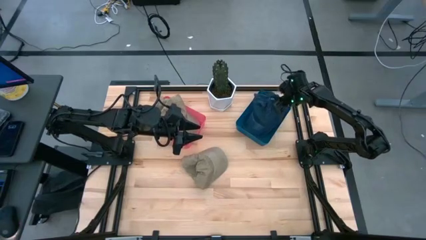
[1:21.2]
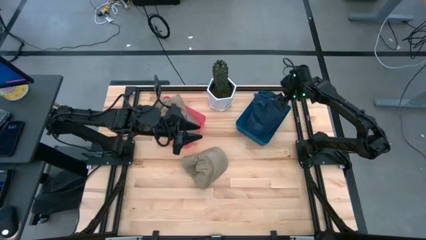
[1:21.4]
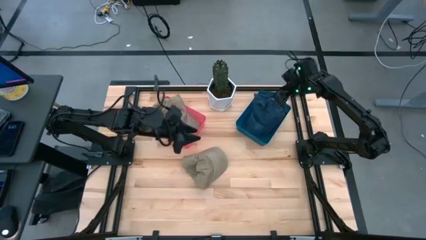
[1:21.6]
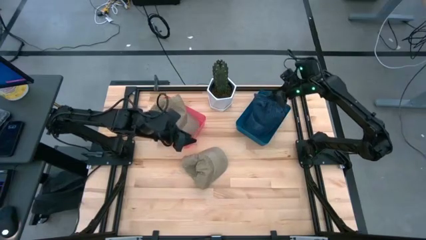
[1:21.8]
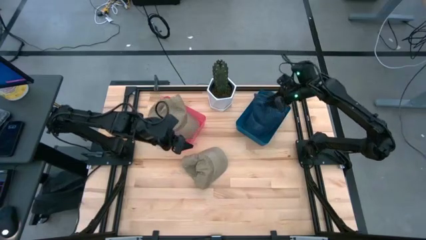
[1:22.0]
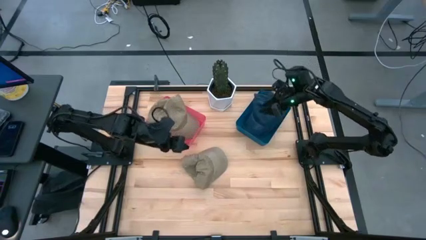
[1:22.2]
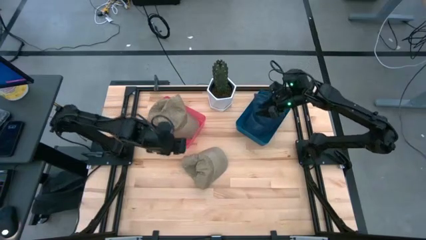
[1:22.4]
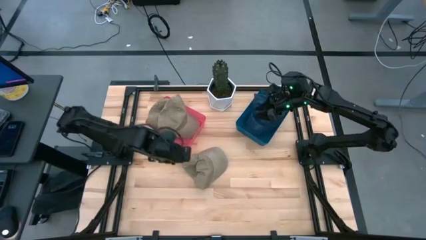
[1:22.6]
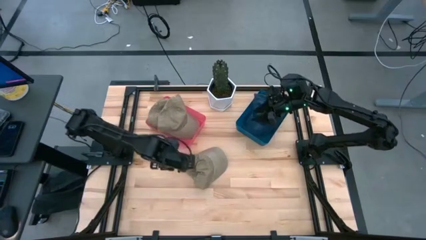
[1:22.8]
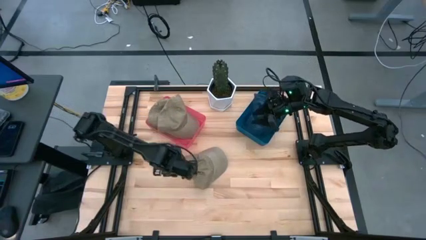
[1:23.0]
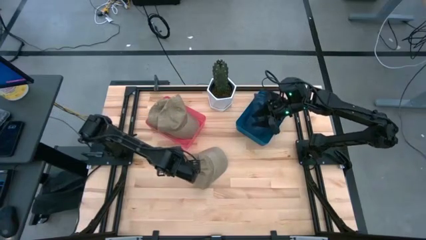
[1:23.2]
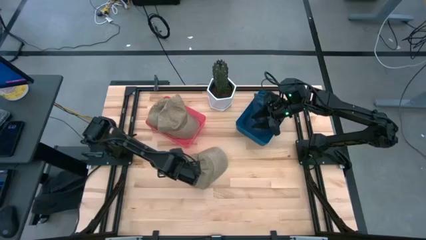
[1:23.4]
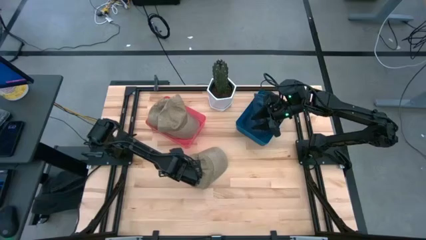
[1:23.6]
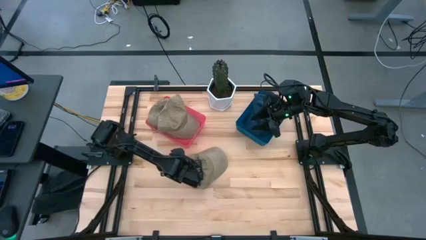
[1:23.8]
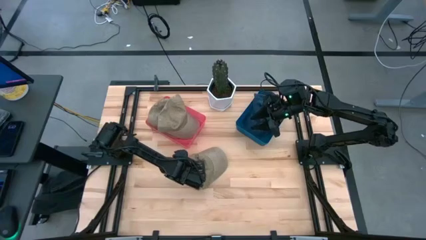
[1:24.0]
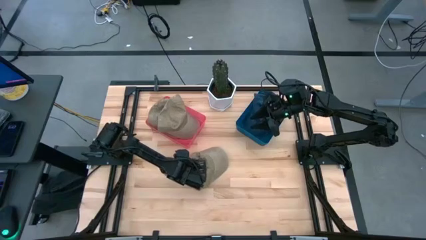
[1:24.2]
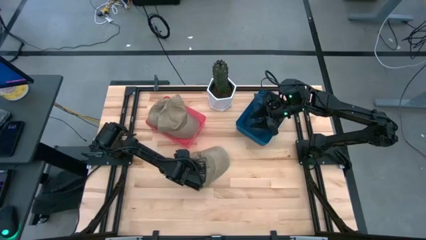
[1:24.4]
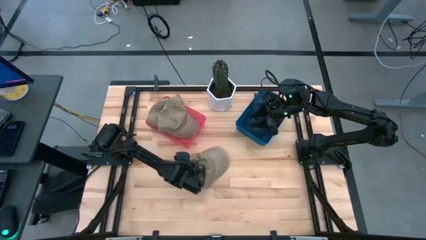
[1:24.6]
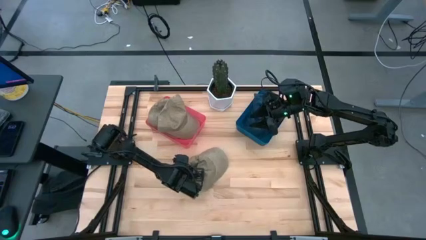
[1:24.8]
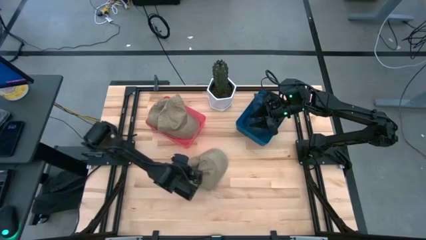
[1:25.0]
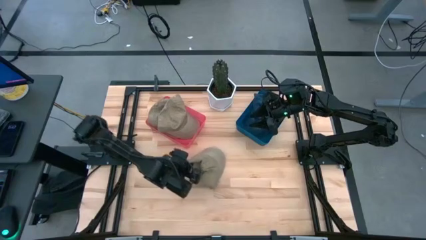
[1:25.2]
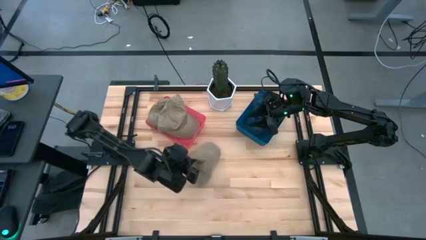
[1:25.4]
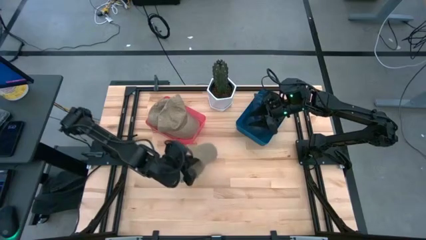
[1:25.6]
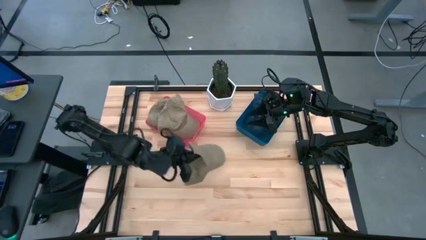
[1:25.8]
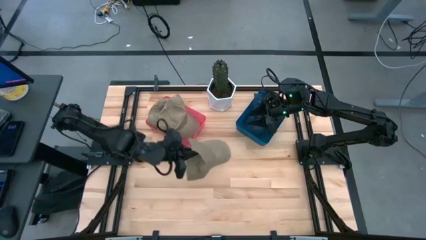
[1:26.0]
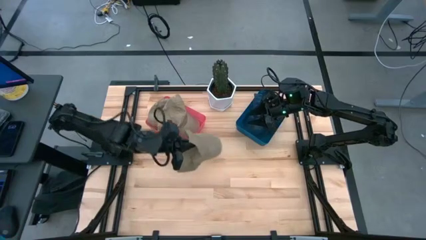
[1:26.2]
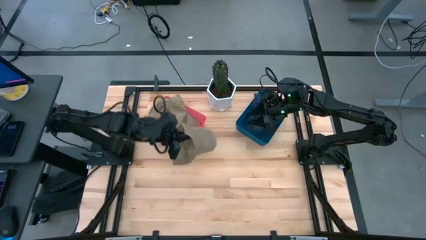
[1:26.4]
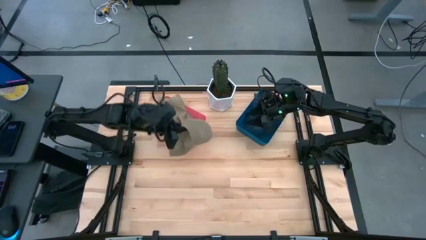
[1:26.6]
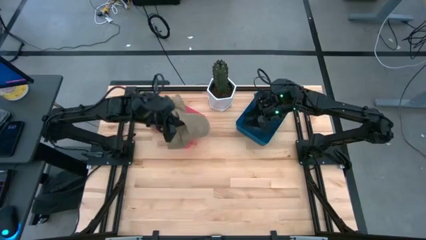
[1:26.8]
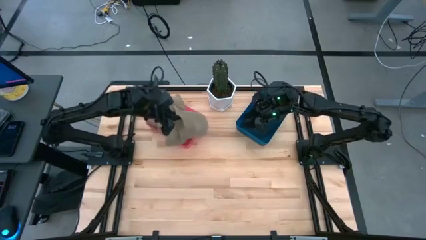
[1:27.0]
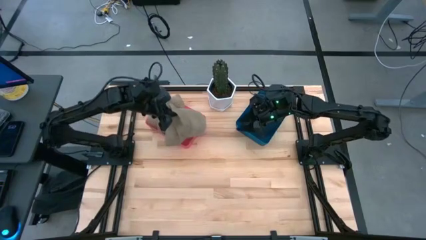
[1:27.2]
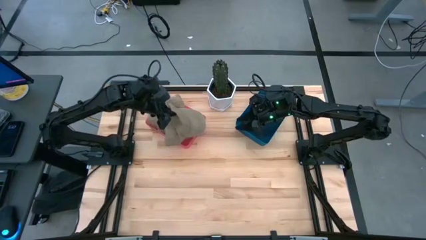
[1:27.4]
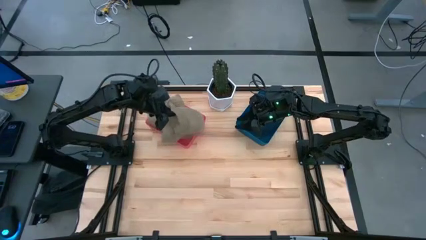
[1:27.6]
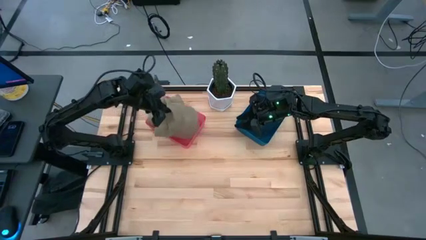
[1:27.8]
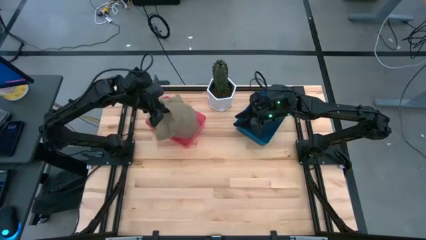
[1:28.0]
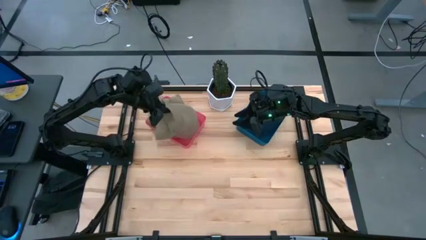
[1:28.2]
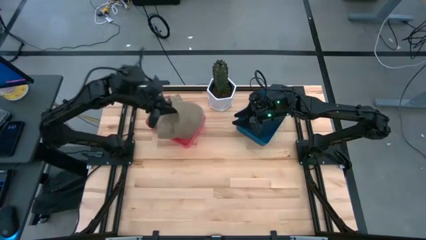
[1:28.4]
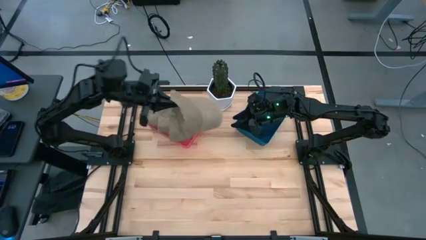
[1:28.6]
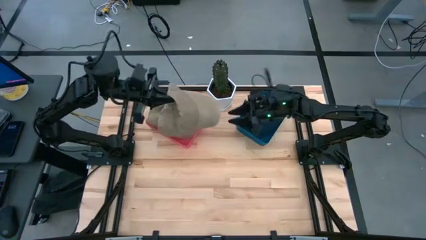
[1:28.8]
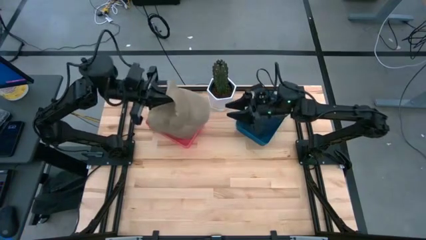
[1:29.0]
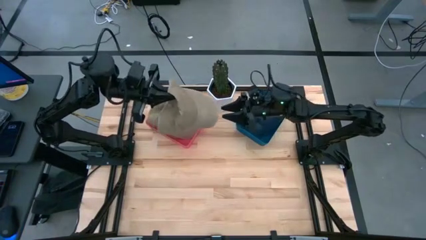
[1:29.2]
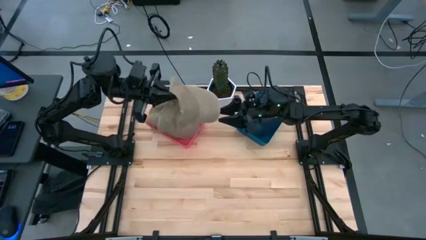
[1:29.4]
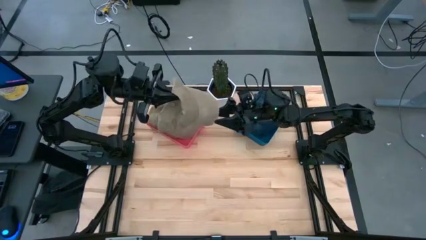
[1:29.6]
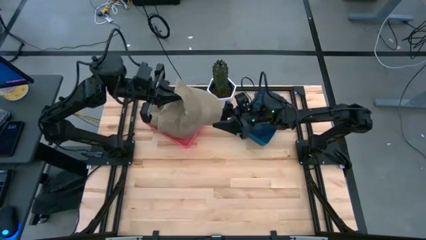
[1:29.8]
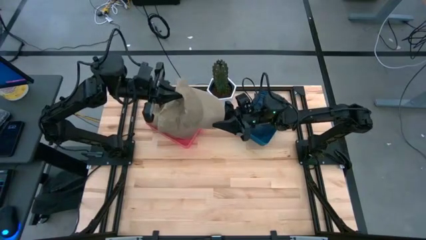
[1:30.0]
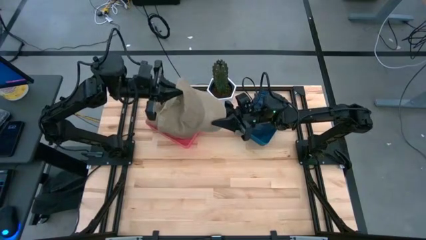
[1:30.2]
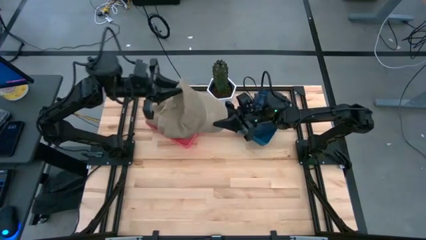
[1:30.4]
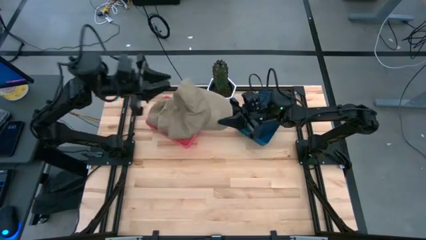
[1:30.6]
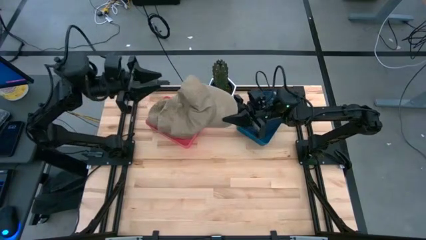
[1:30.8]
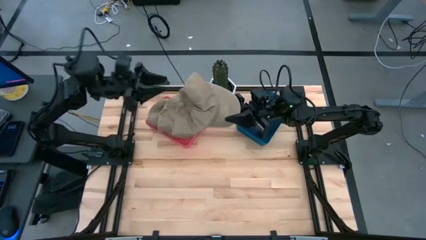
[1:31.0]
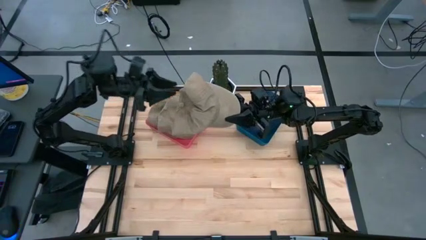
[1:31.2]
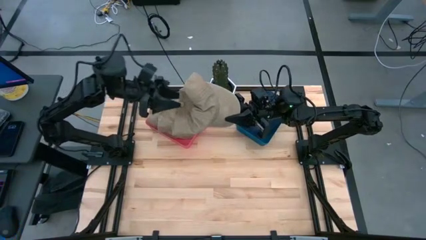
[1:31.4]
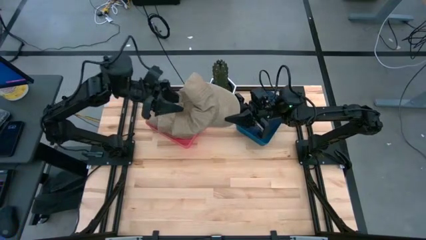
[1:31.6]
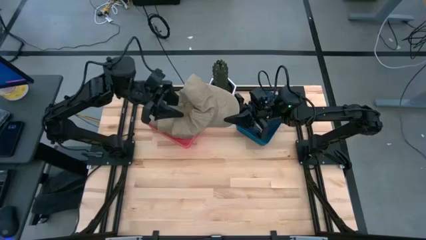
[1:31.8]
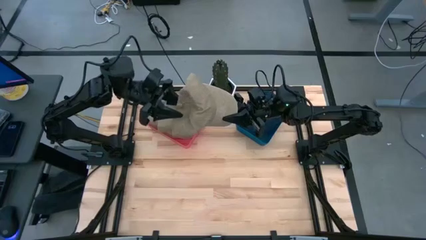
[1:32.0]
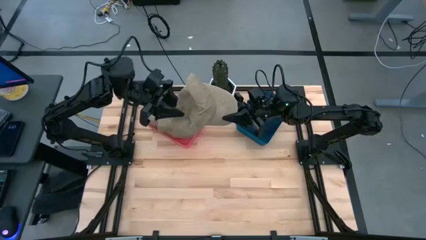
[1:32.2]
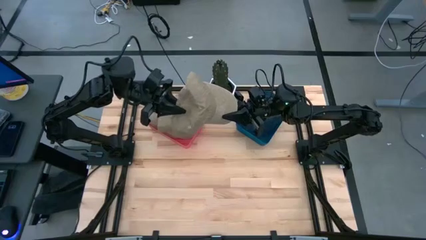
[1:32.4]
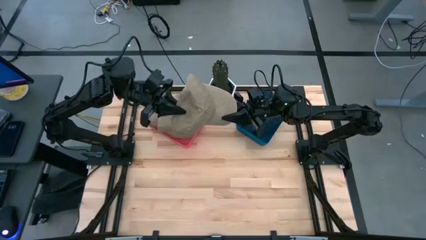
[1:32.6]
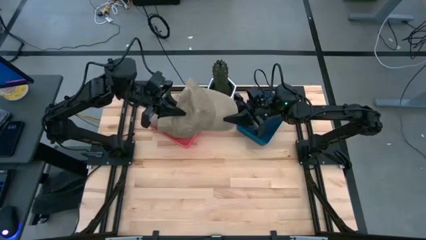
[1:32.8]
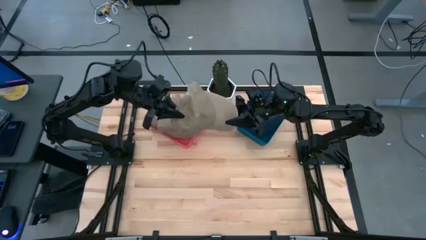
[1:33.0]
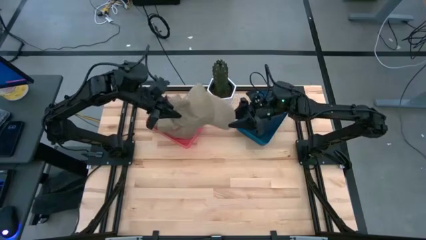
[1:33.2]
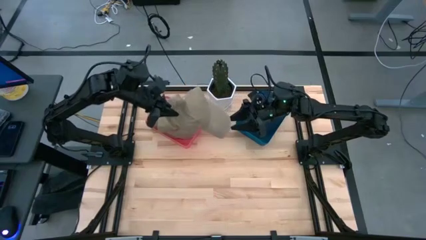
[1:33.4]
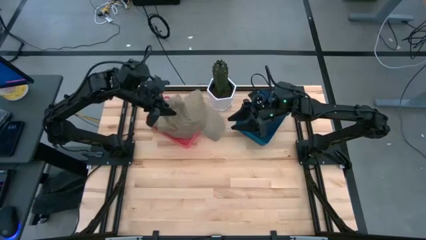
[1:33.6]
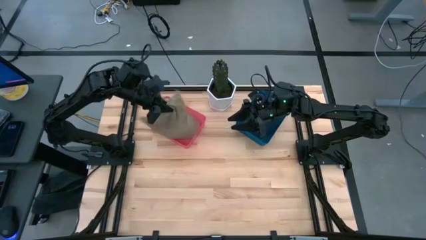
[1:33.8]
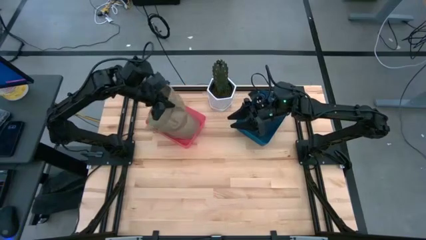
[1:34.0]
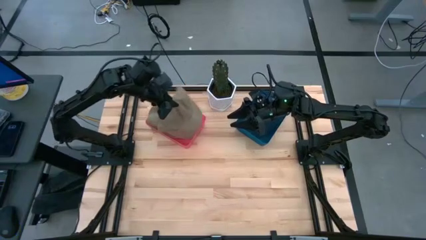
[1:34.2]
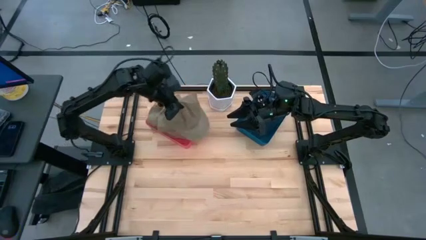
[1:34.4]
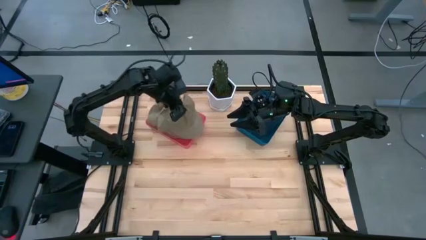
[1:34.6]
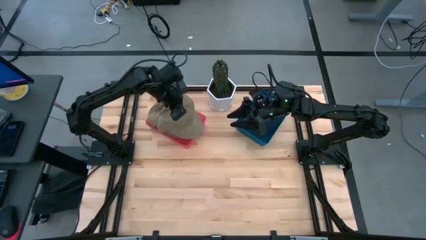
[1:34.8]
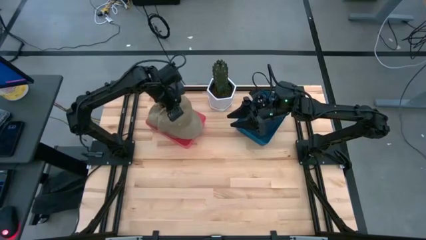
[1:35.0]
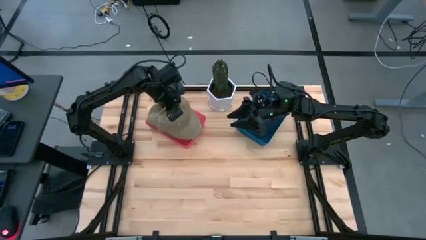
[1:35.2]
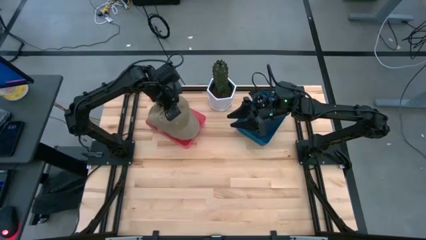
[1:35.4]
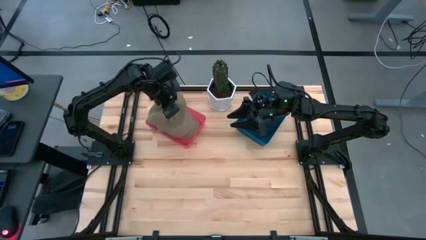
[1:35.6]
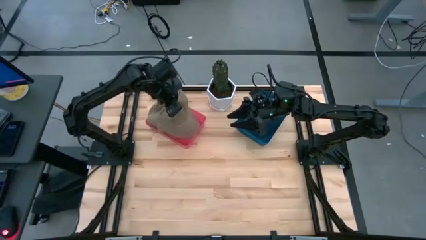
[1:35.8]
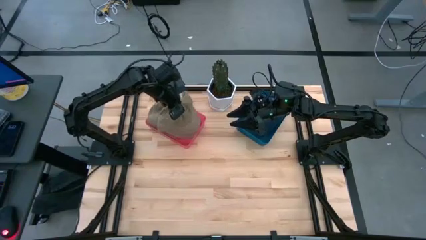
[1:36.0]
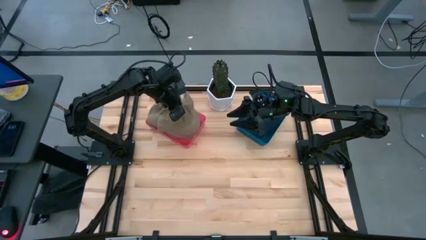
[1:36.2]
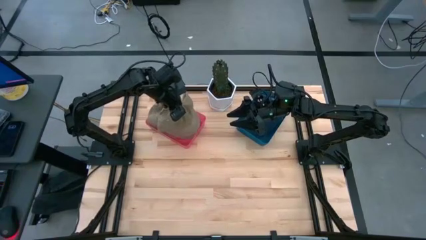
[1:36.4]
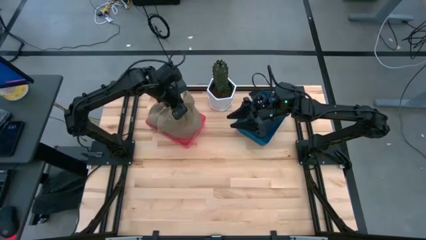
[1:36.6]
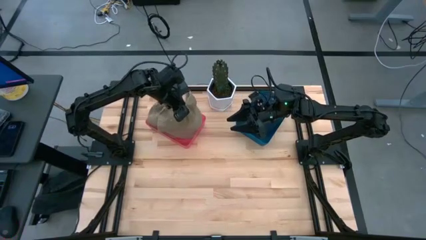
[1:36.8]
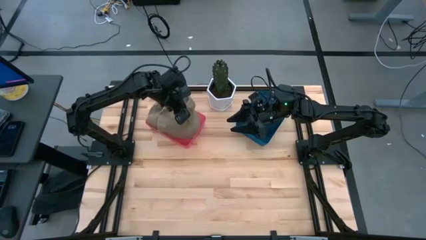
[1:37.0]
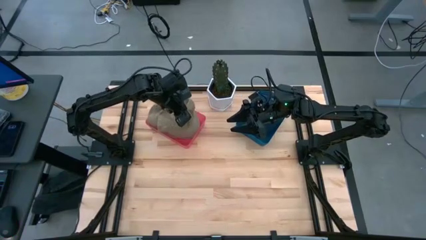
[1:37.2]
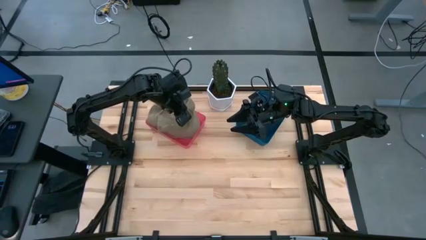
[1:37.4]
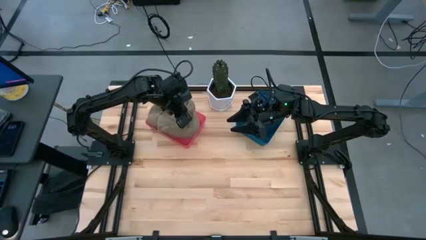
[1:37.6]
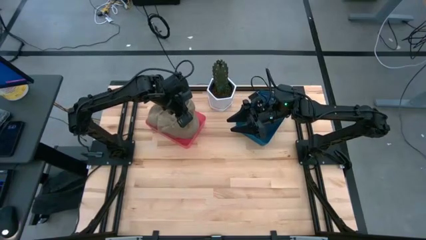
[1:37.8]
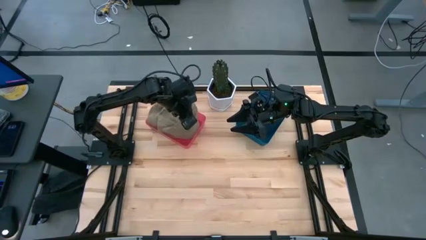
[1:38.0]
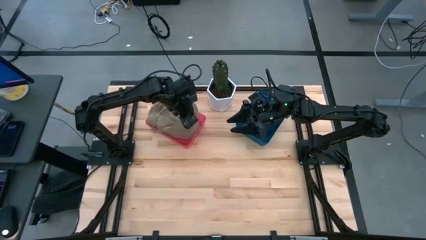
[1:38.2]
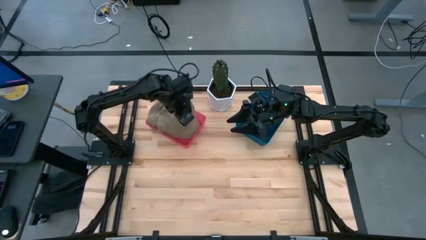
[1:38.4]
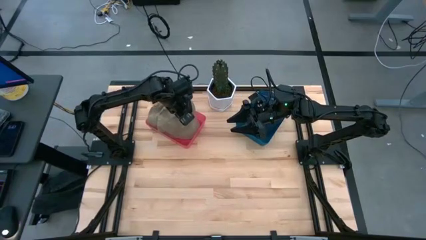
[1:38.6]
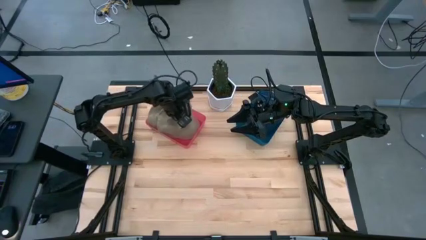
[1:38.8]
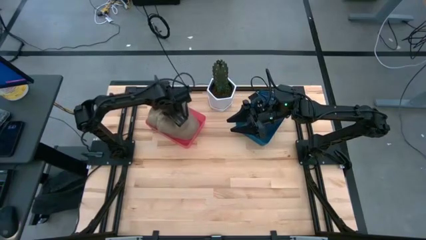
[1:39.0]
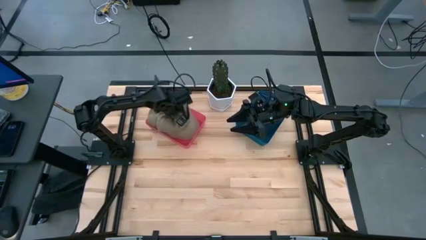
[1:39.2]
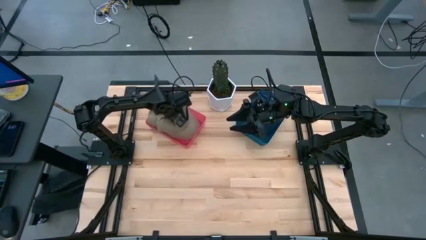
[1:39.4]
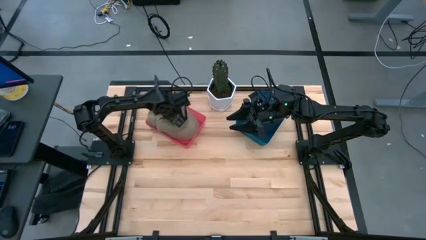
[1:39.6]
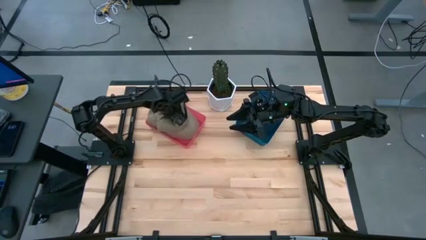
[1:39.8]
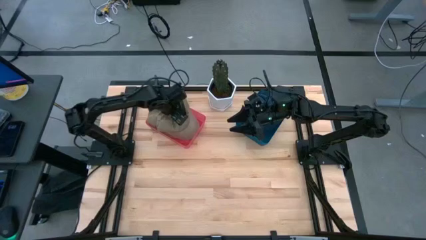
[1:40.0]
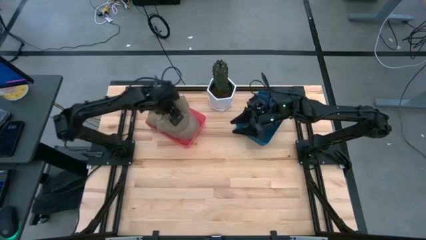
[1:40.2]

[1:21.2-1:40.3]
Task: Pick & Place hat
Put the brown cap into the red bin
